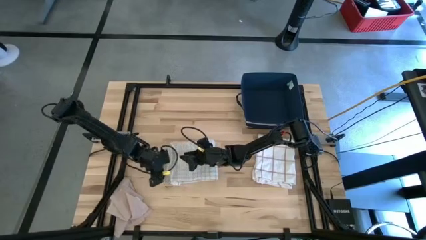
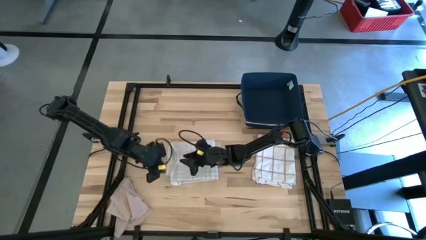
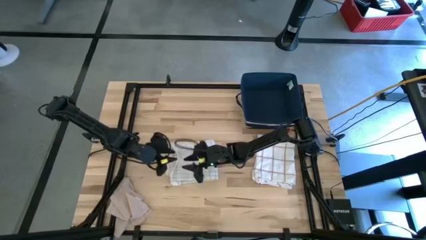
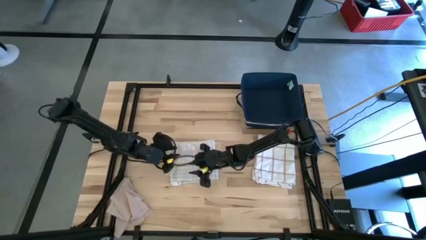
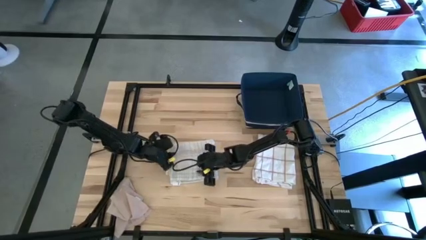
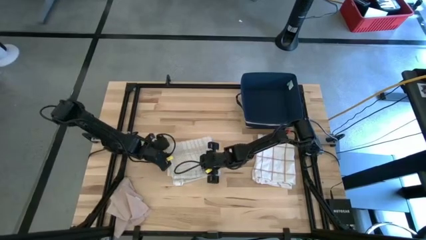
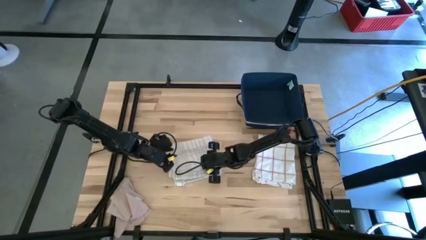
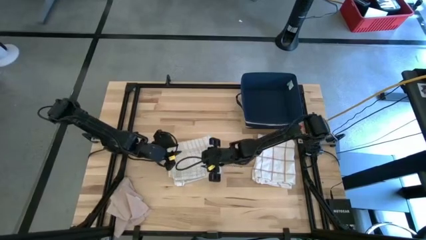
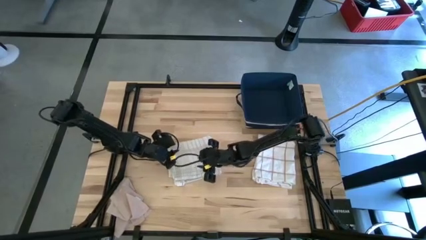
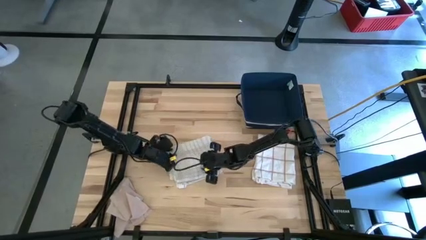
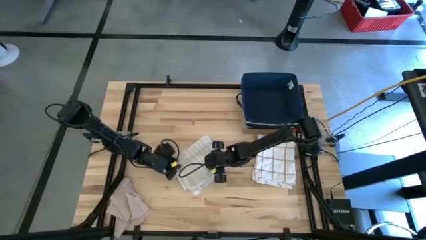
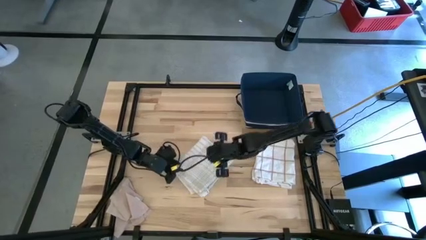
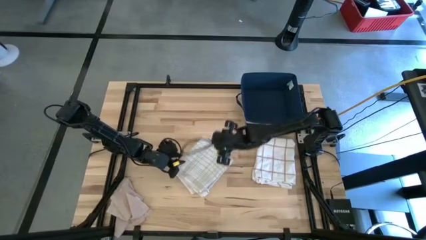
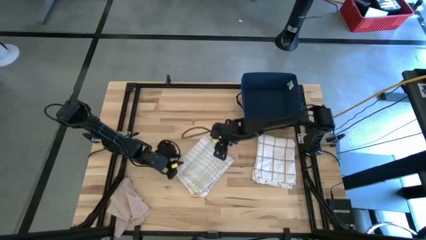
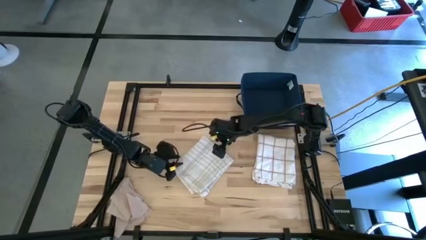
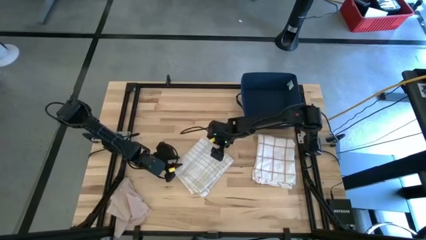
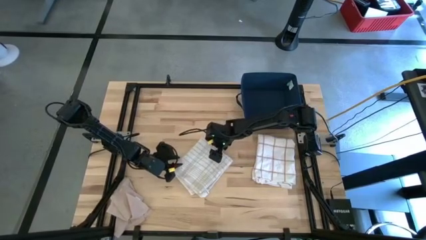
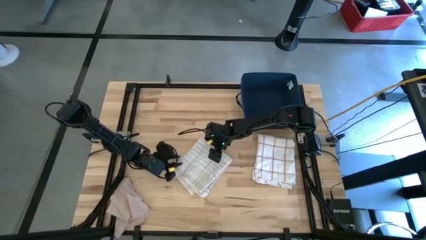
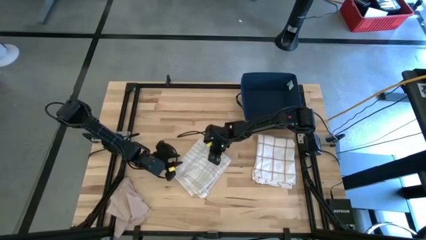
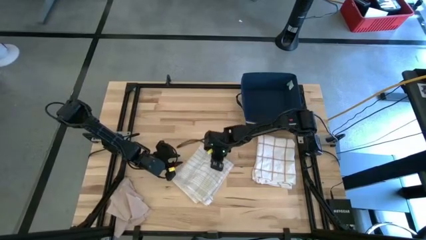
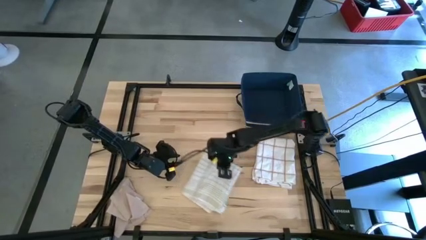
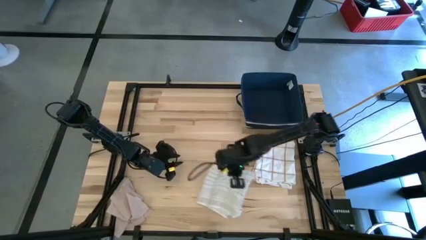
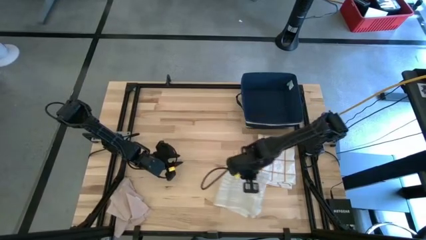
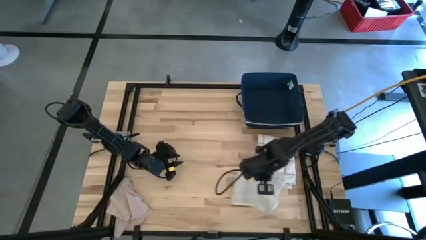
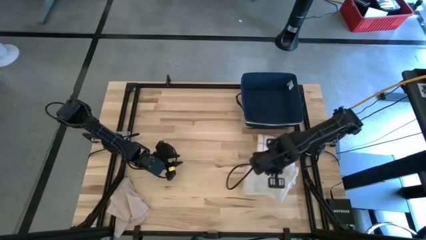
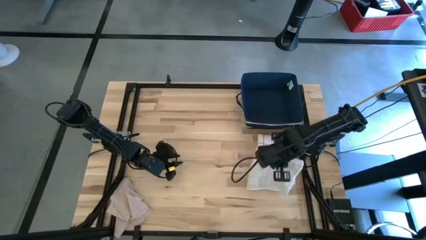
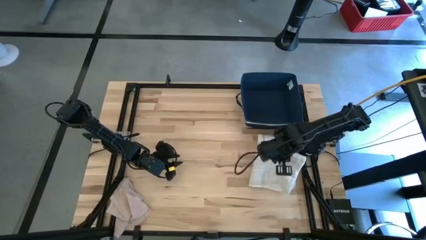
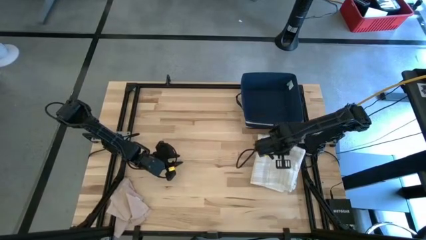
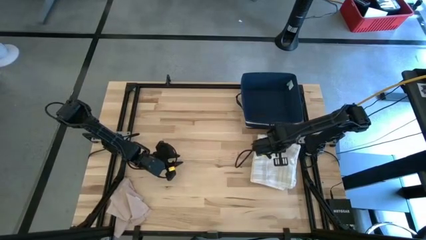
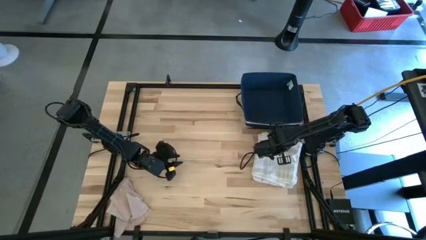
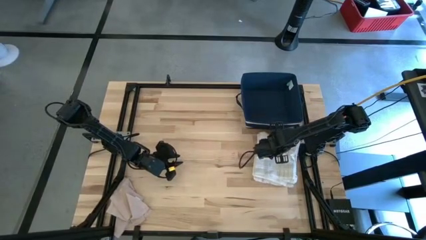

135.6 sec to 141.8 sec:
Task: Fold towel
Stack the white plaid towel on the white patterned towel

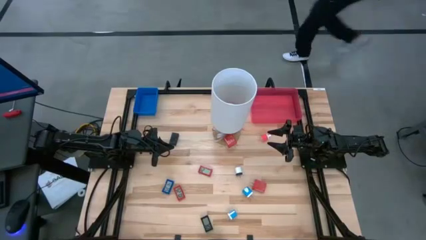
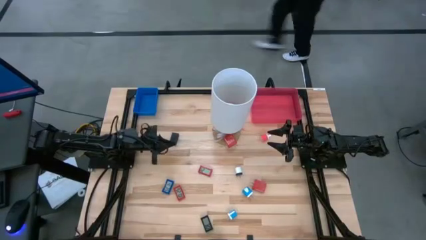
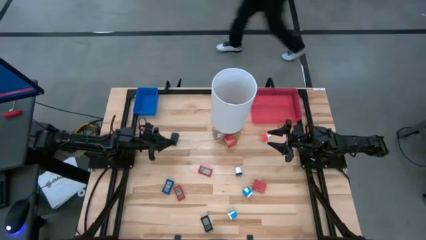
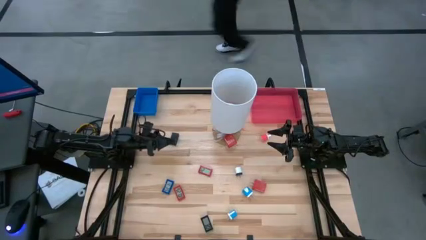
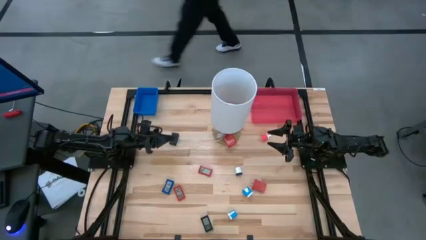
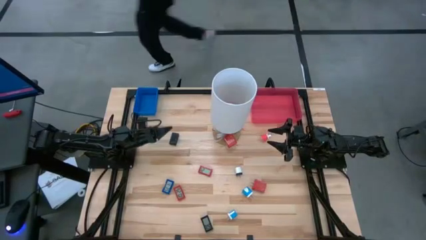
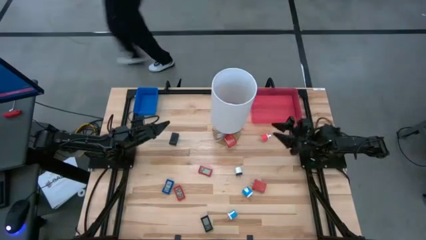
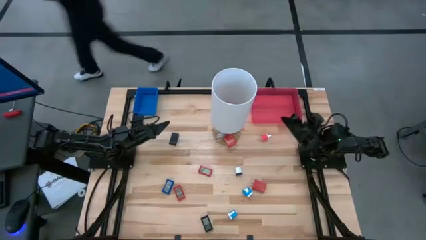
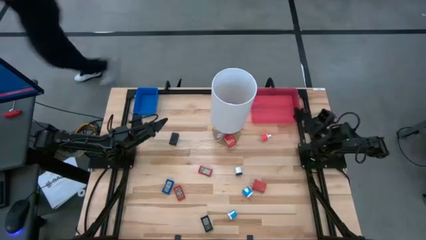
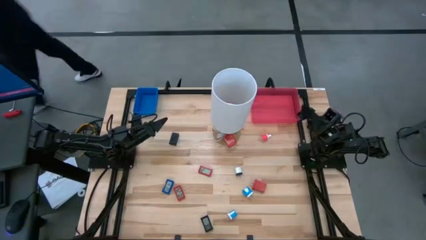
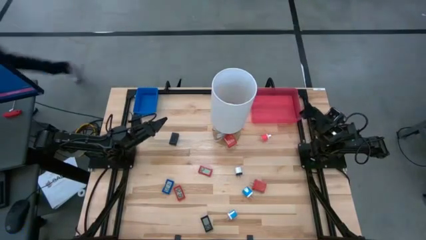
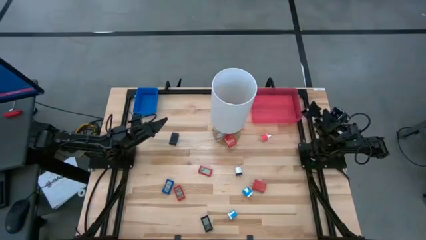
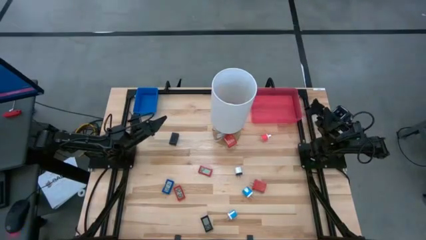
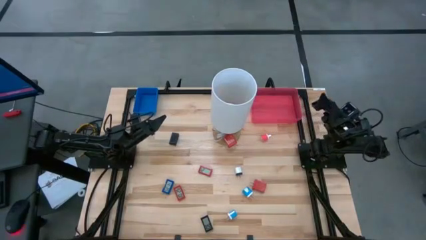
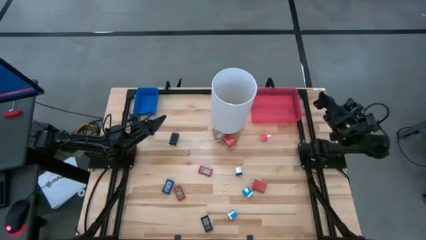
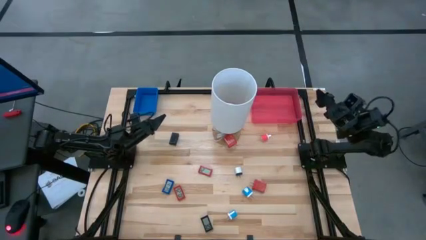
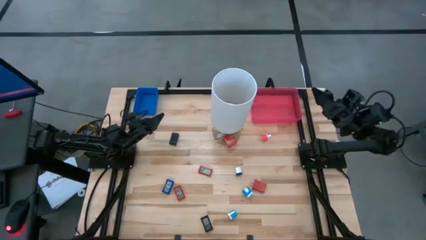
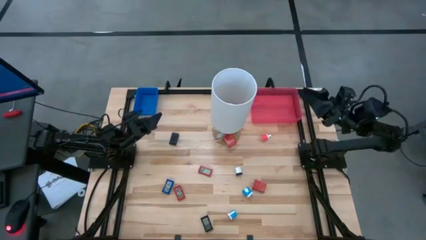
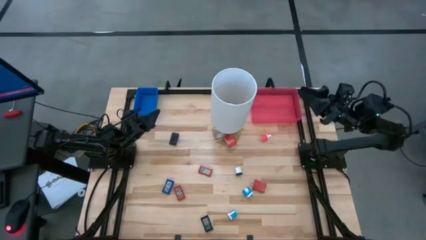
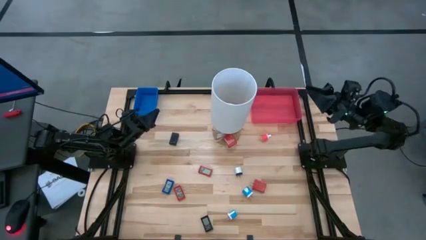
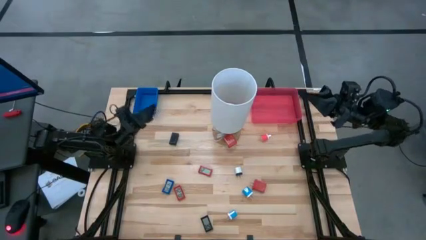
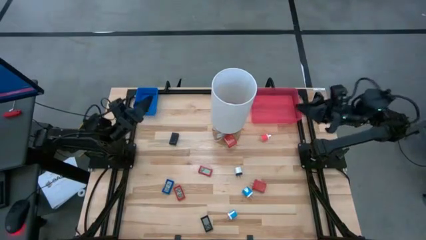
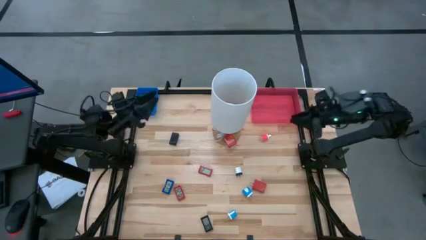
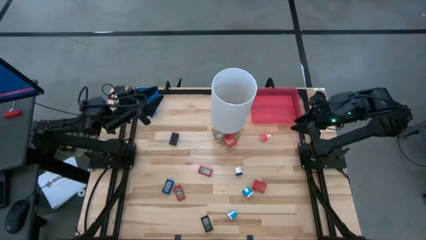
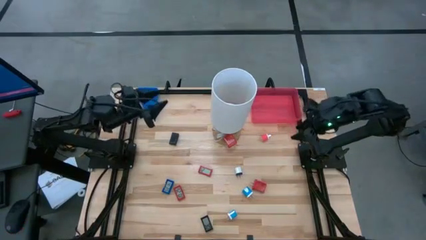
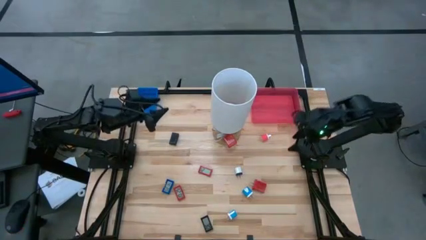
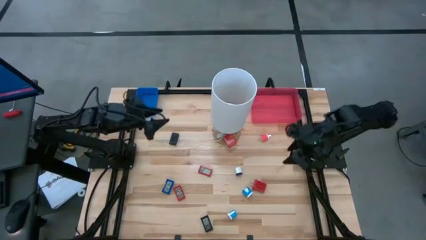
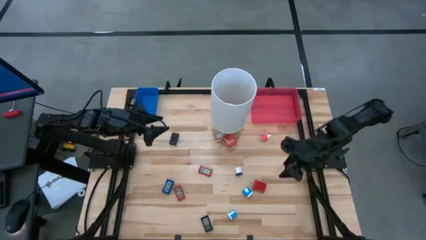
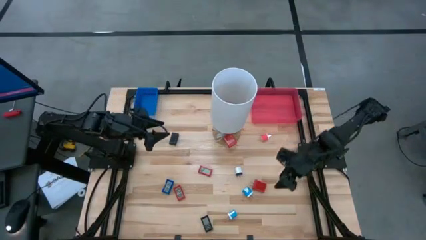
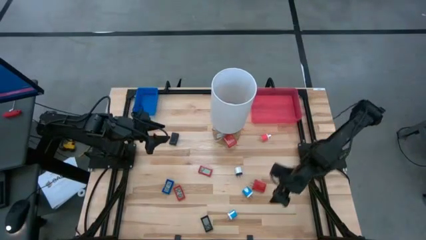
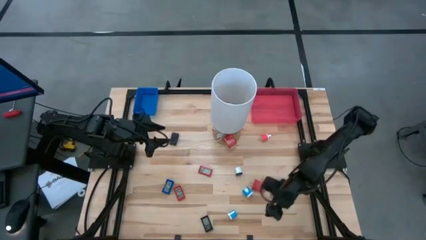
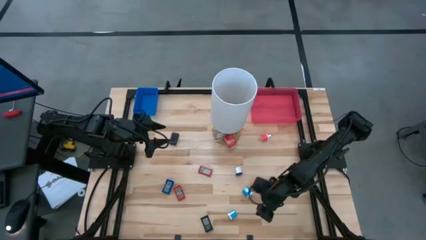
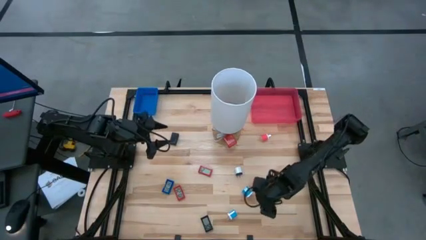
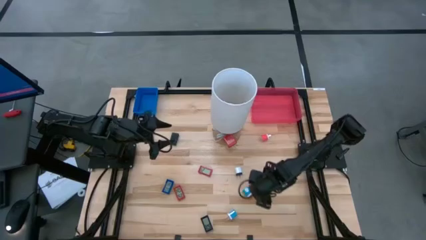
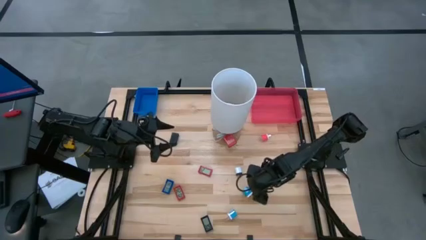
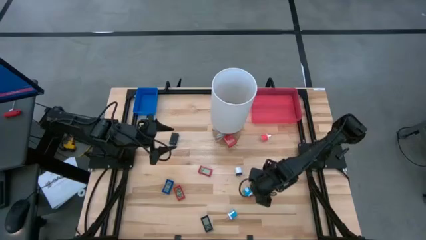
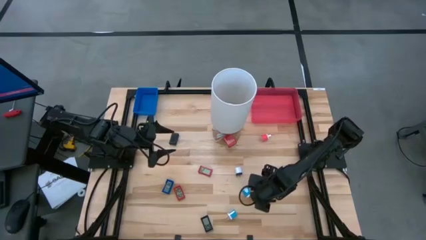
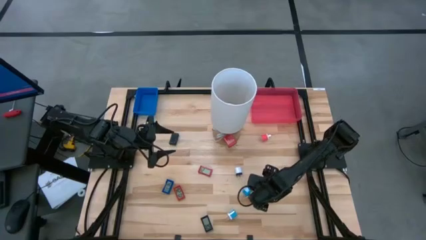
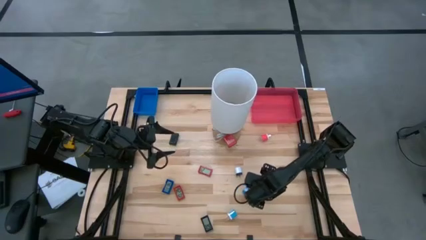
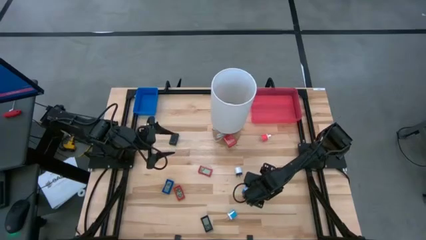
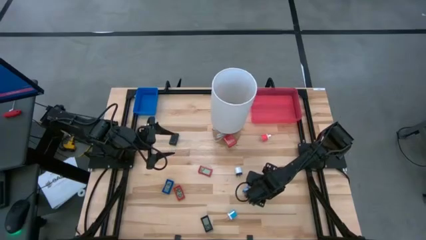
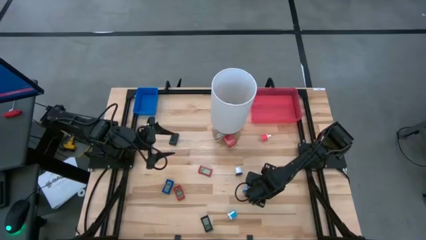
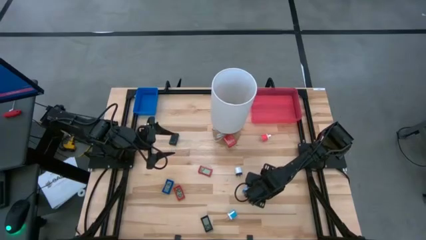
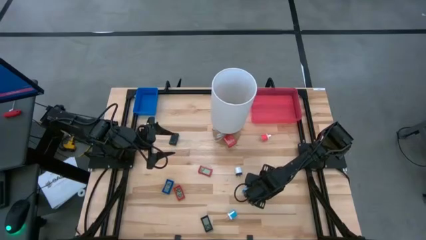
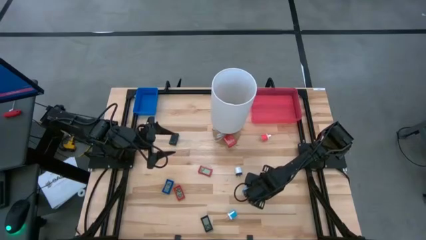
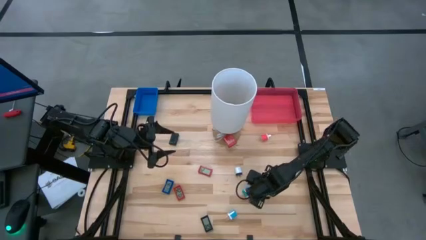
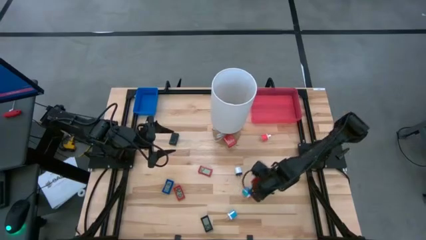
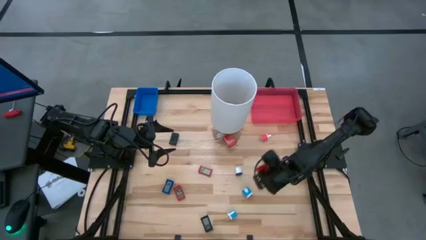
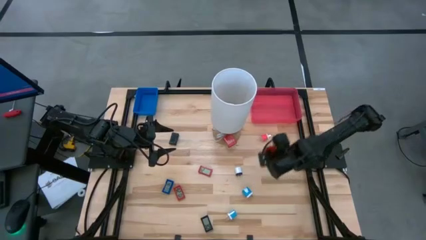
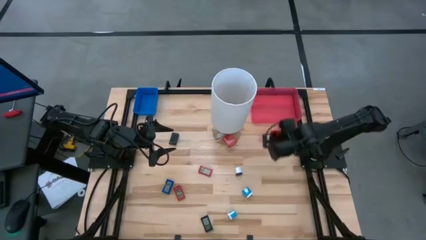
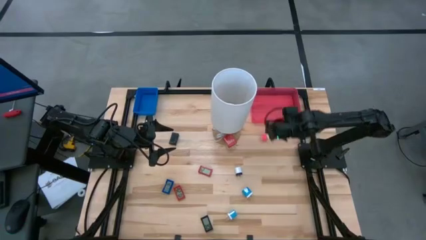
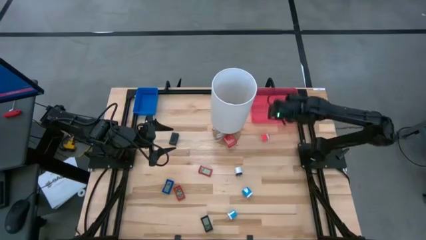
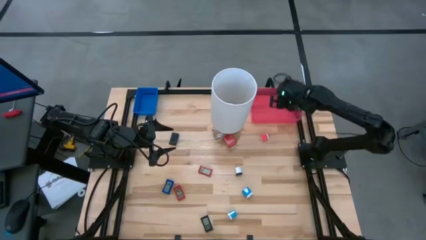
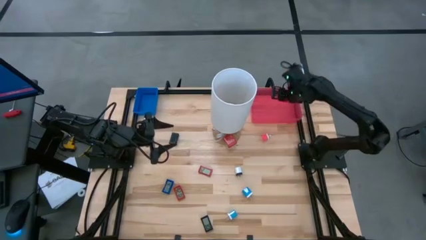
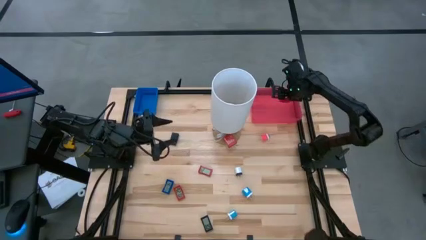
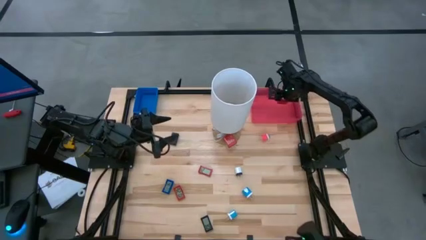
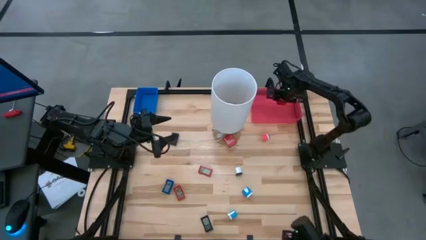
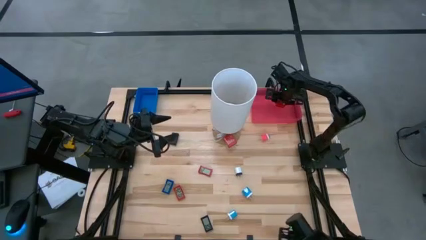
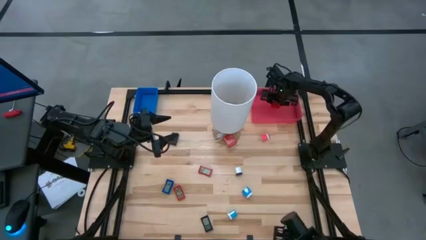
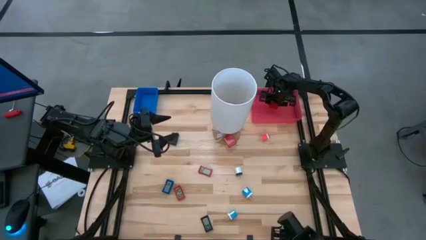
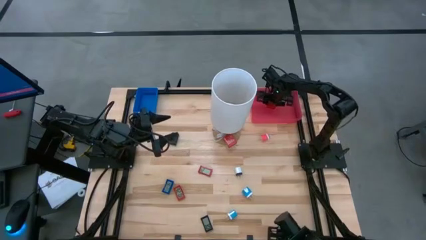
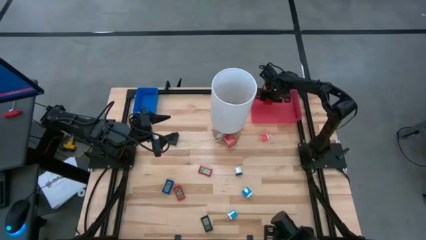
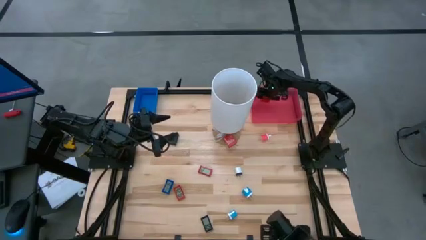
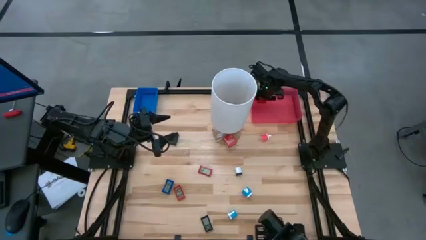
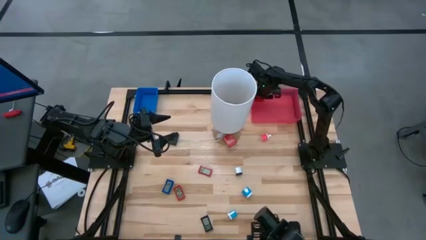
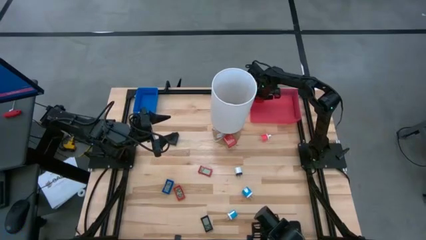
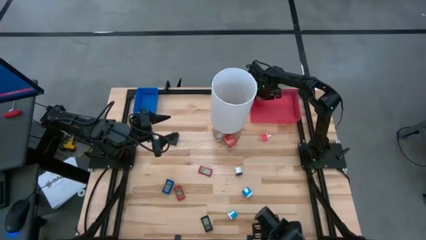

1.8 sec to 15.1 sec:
Task: Pick & Place Office items
Put the bottom red charger adapter into the pink bin
